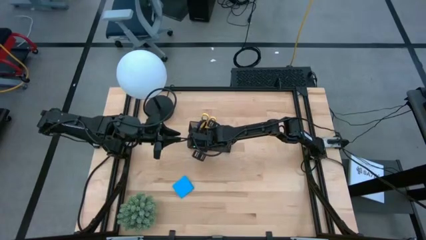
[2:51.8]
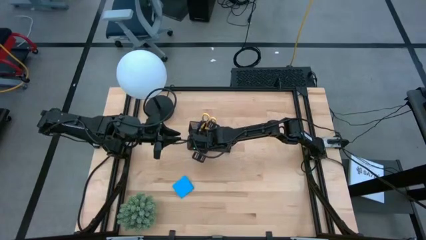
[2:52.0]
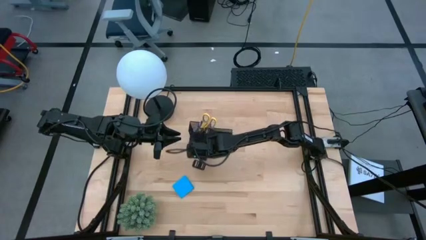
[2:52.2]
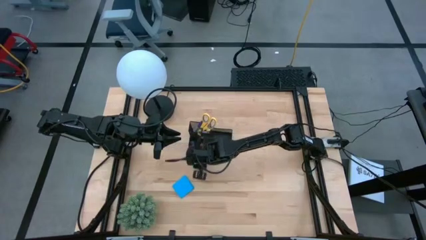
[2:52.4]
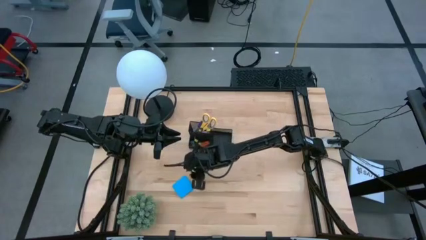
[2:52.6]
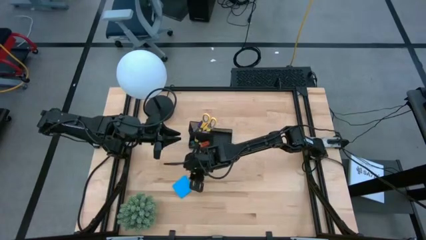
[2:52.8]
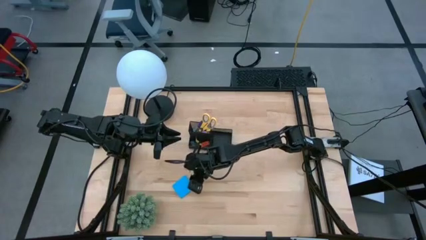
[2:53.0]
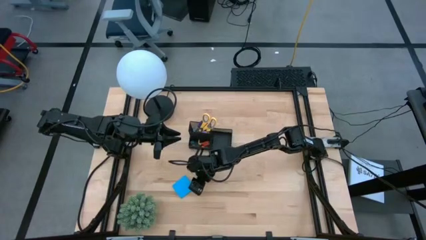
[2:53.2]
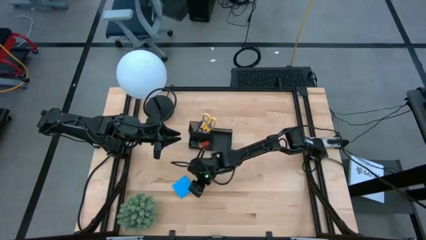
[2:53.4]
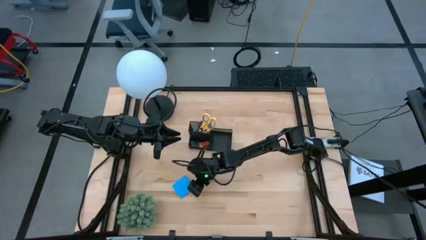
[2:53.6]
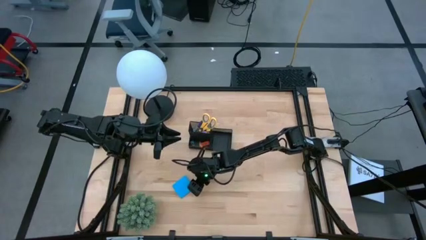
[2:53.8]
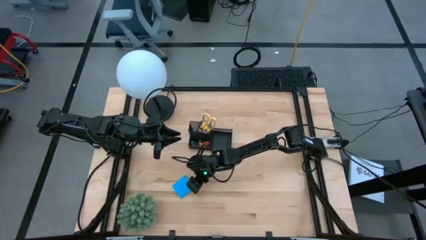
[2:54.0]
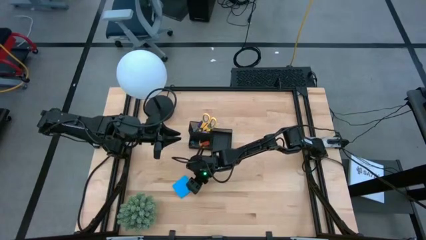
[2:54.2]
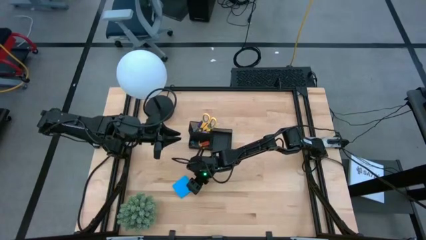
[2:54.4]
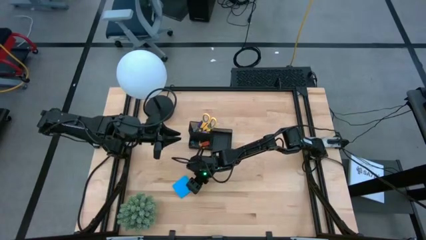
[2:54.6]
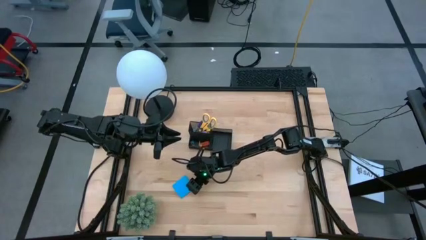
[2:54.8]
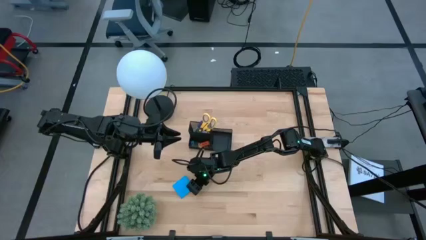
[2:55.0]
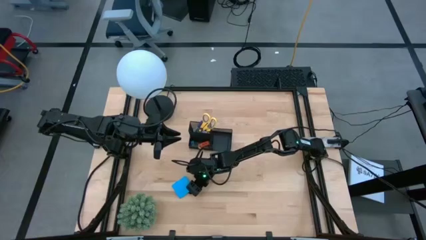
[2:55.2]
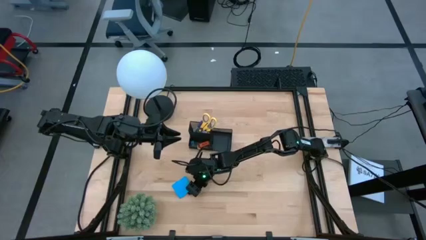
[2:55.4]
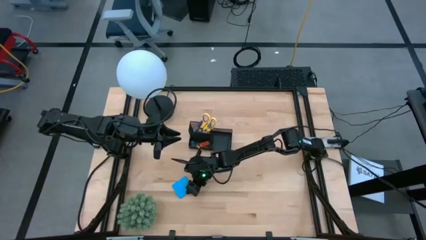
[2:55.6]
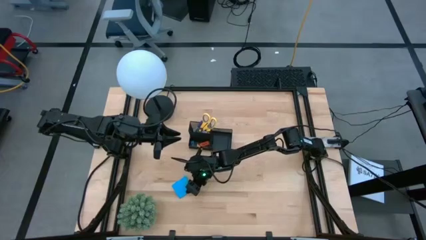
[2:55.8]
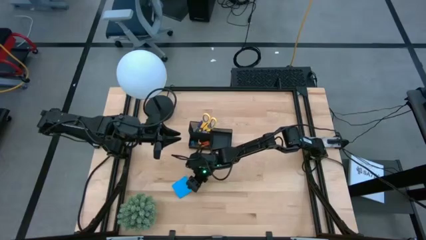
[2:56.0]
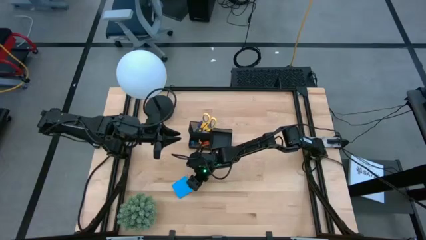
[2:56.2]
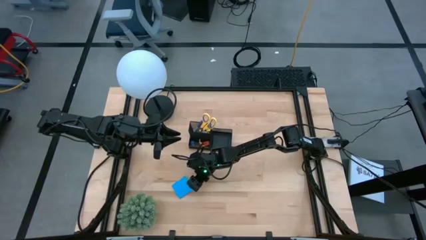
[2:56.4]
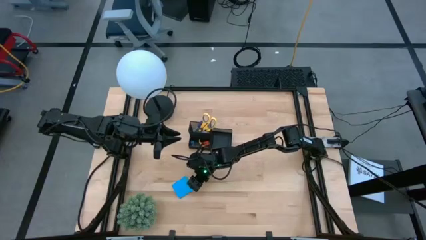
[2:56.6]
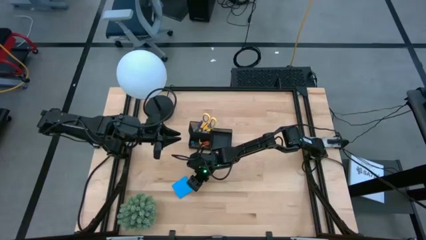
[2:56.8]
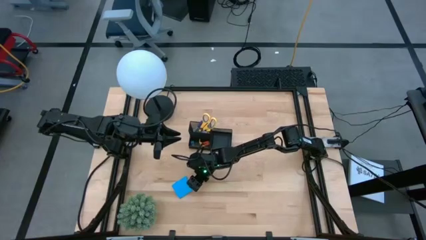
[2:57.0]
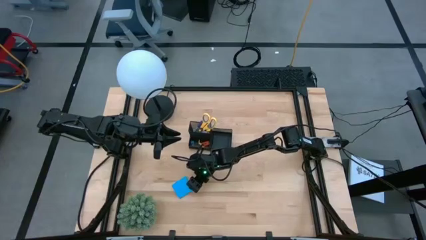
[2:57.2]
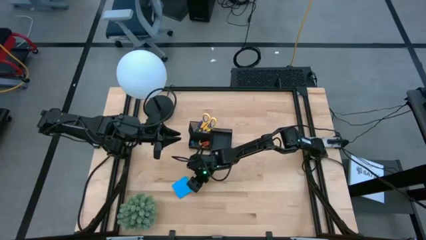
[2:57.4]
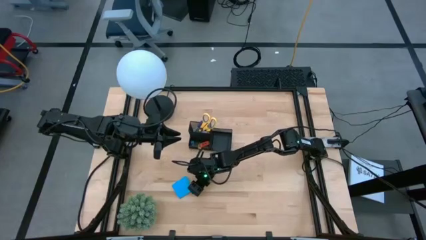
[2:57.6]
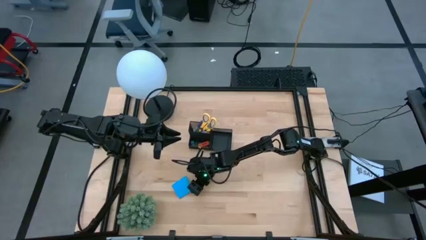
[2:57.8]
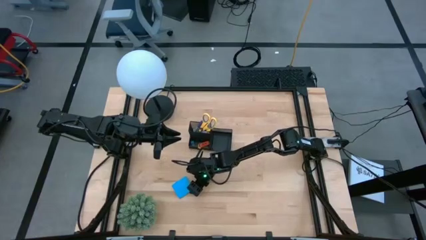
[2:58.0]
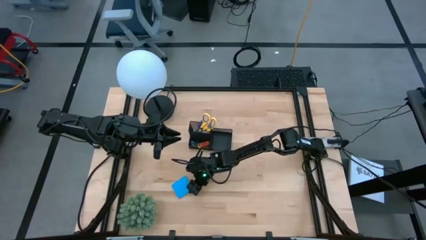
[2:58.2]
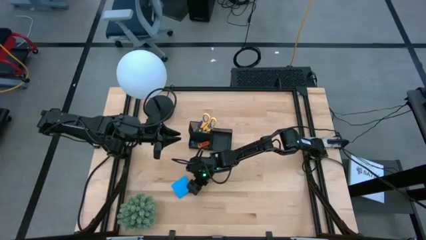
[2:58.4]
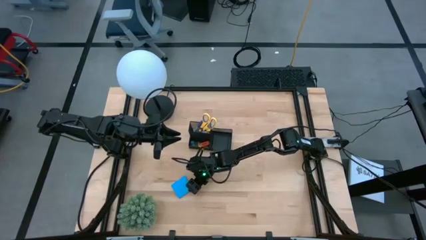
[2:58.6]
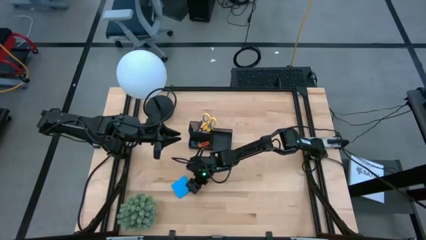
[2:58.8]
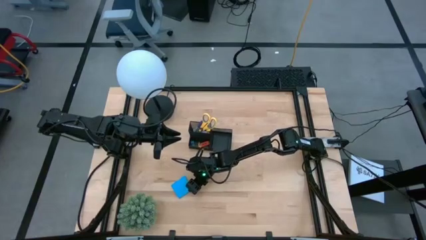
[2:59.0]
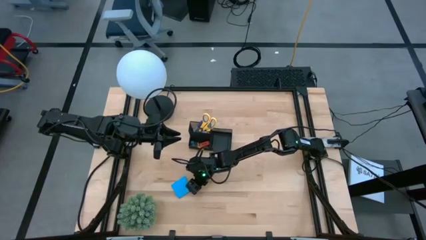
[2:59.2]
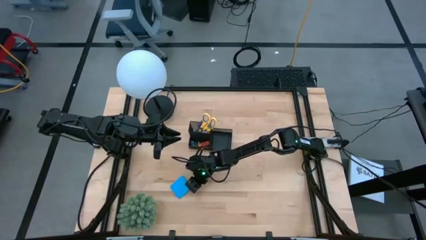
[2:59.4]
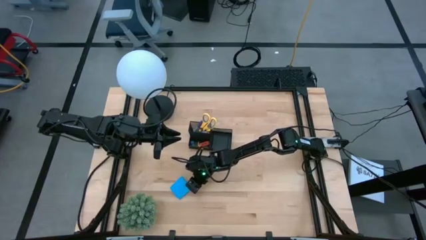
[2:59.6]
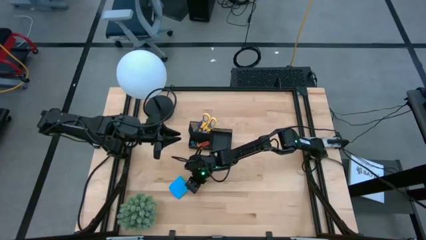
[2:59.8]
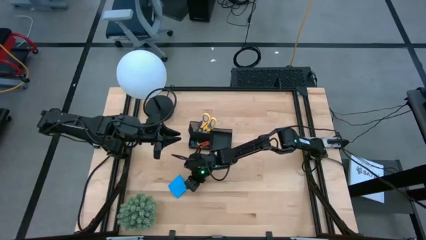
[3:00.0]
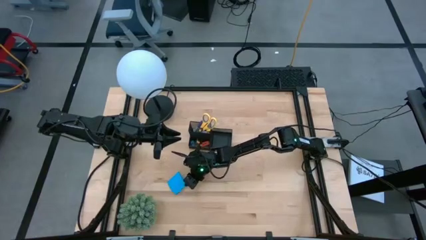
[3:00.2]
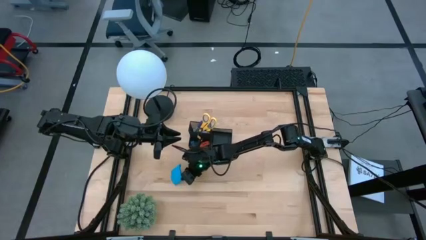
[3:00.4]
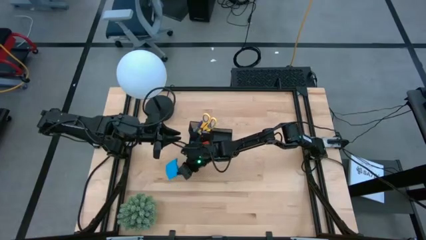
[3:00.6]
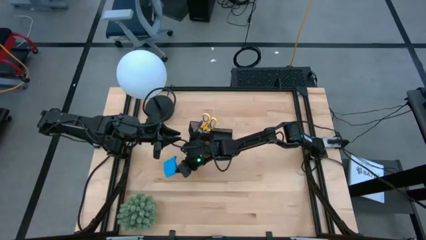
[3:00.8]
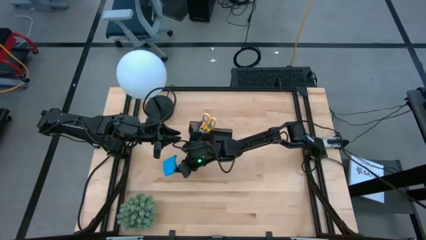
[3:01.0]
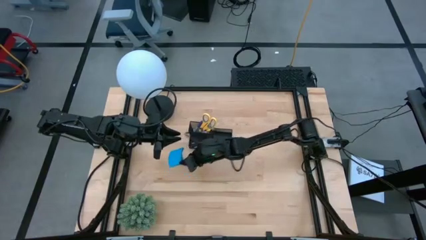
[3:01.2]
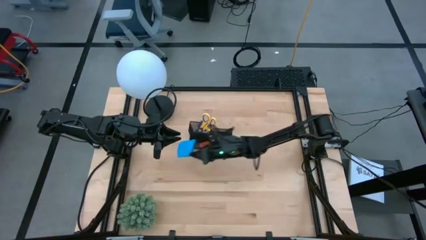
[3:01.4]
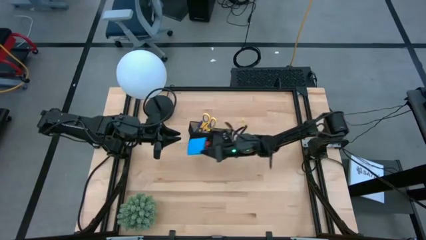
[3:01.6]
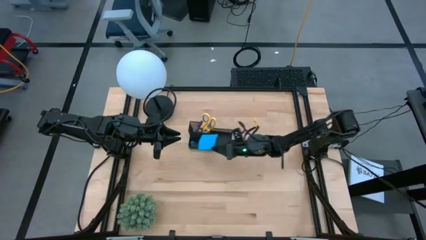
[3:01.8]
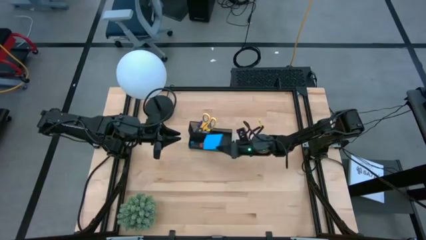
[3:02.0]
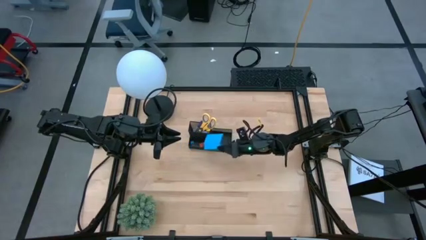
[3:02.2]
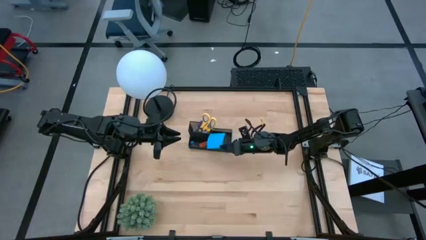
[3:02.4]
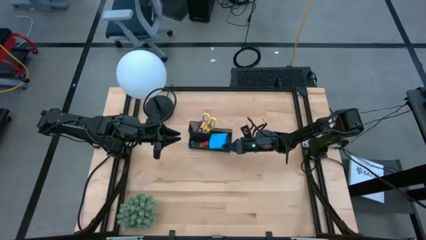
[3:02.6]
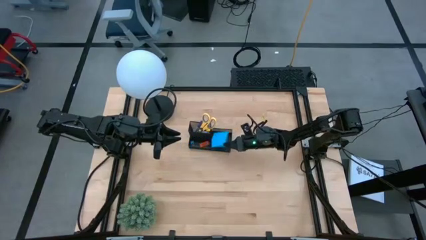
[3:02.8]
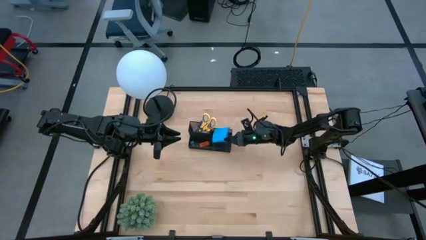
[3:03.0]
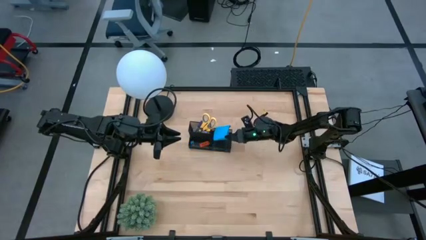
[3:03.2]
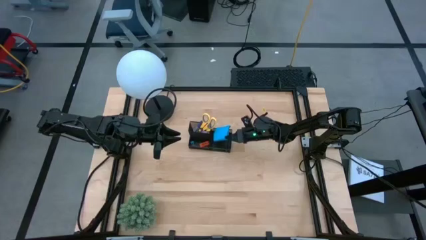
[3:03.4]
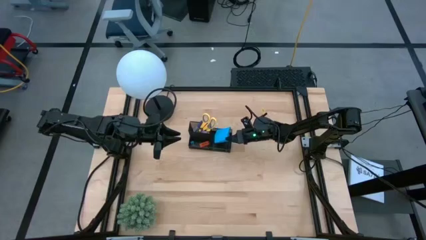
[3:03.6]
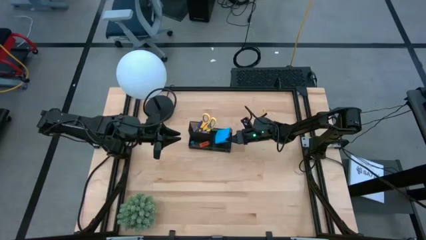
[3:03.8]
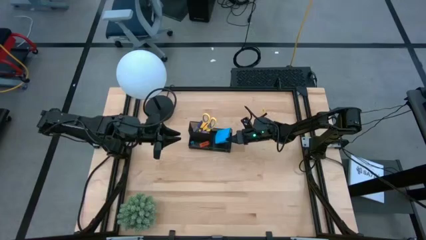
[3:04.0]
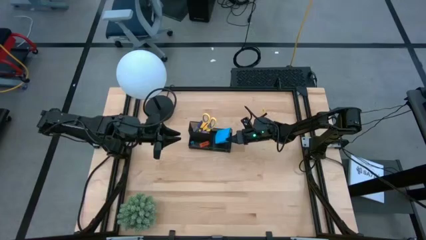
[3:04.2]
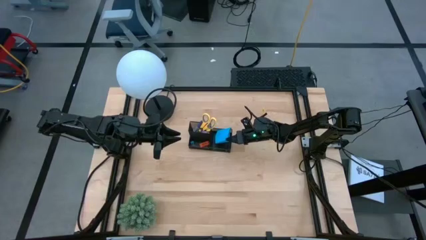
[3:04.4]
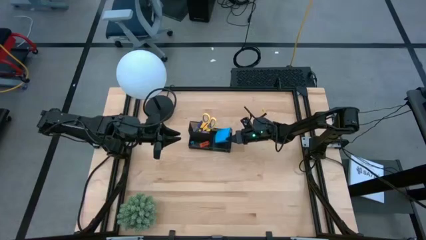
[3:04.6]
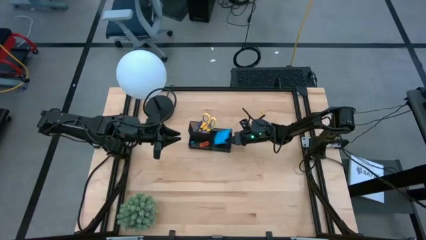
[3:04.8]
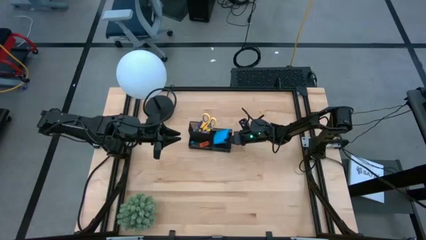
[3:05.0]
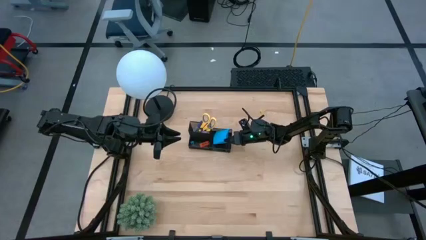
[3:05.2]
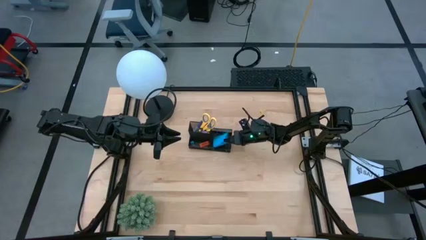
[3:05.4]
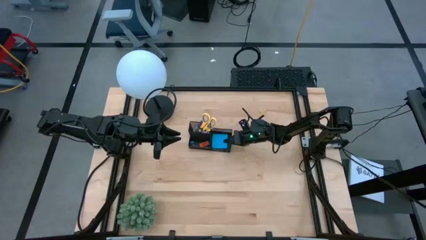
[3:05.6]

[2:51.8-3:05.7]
Task: Pick and place office supplies into organizer
Put the blue sticky note into the black desk organizer

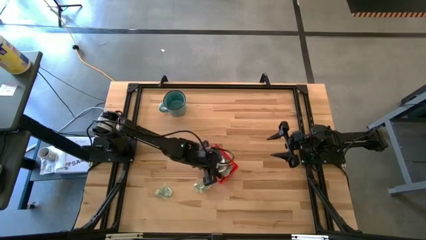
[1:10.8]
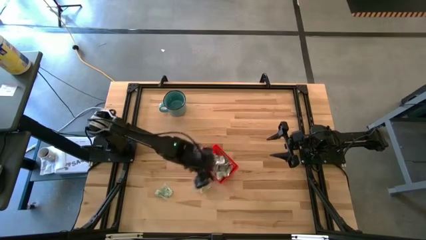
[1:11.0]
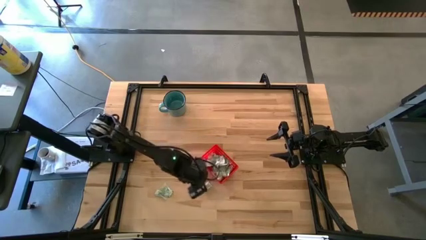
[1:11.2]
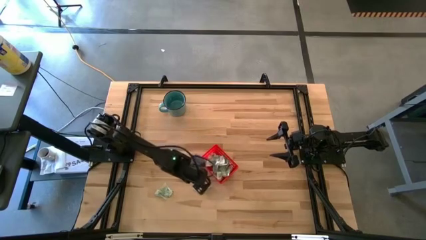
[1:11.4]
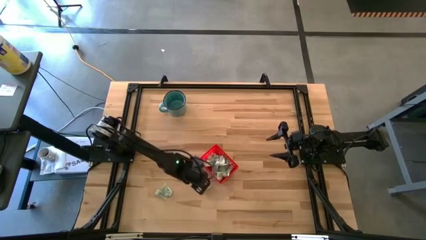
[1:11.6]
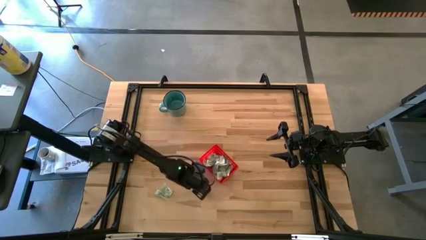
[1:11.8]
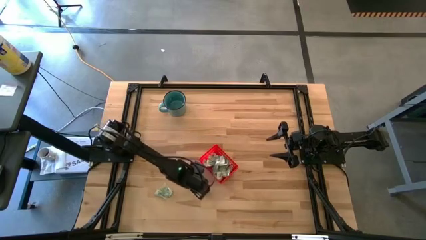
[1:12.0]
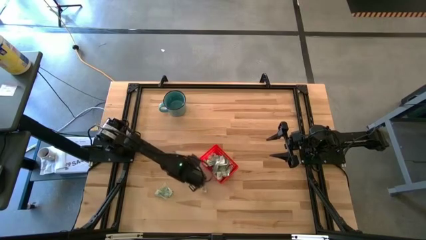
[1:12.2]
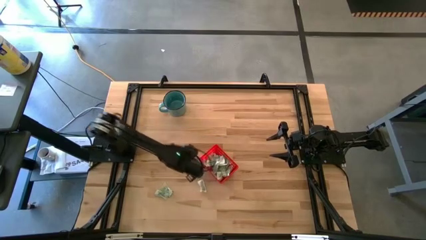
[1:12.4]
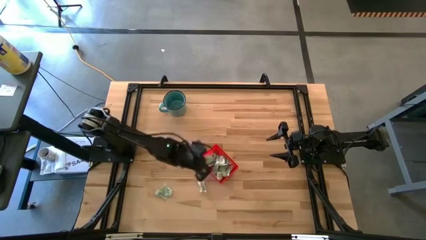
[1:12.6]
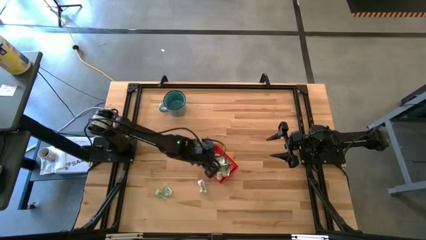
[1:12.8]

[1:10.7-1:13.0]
Task: Pick and place Stevia / Truvia into bins
Put the white stevia packet into the basket

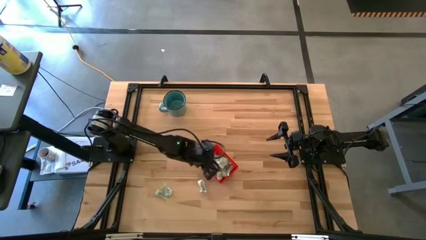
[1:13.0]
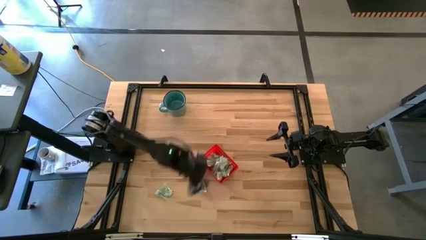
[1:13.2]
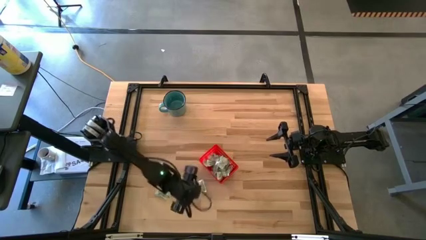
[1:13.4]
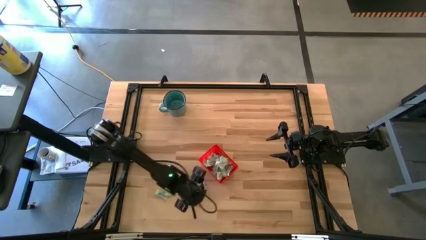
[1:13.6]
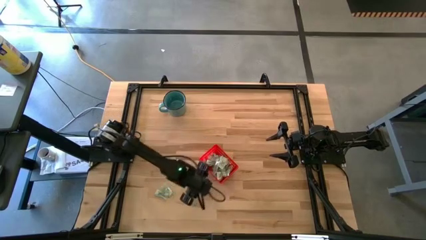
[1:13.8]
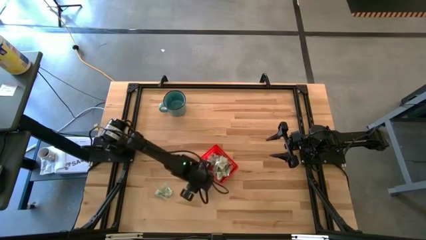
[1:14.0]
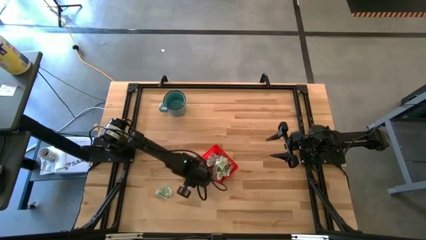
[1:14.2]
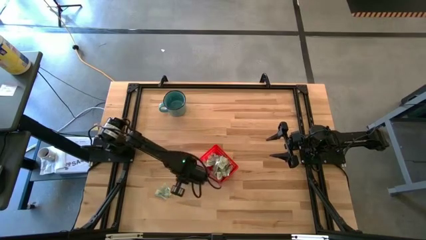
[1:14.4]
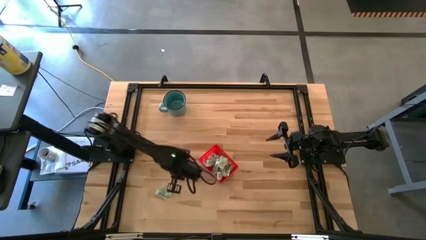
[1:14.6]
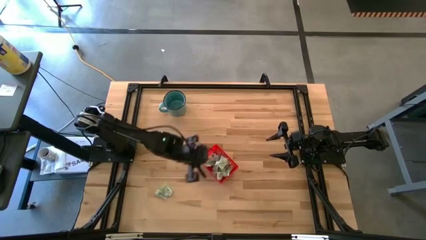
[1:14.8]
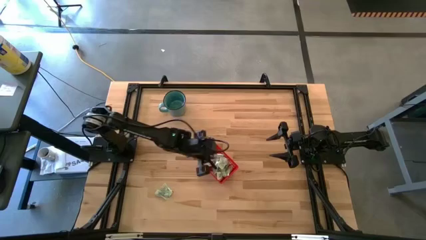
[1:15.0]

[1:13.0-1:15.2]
Put the right white stevia packet into the basket
